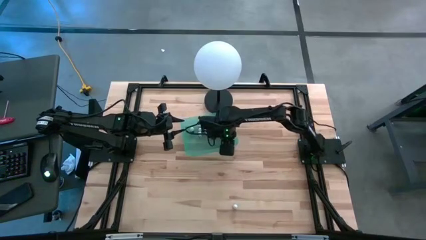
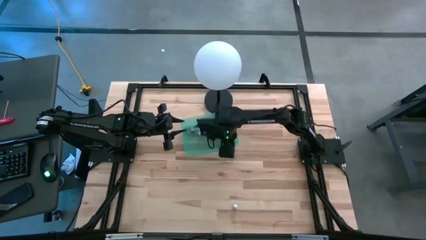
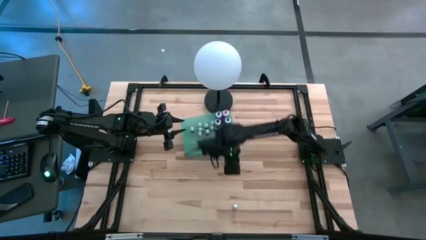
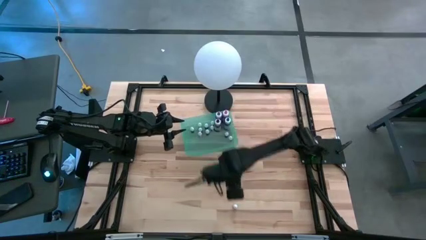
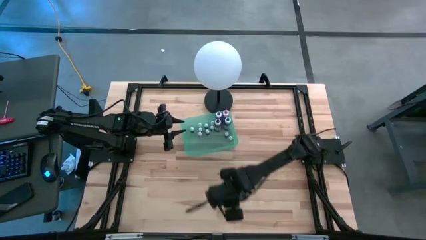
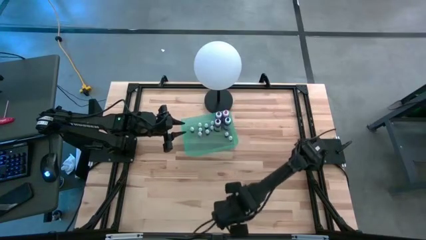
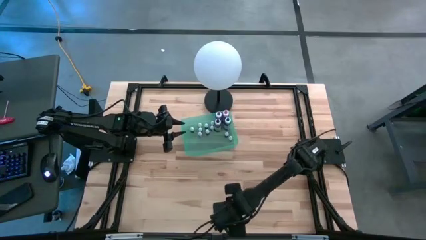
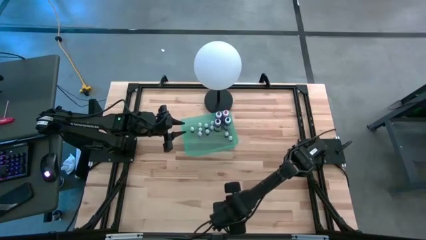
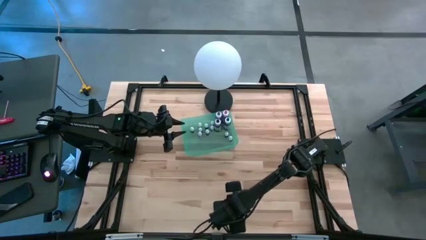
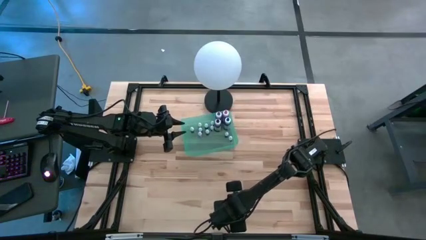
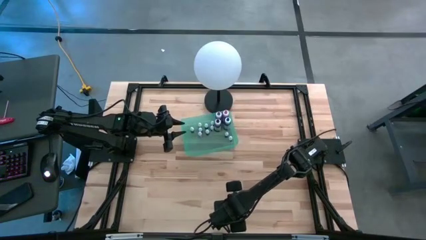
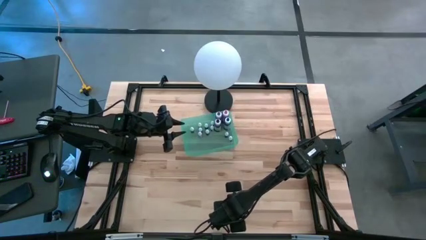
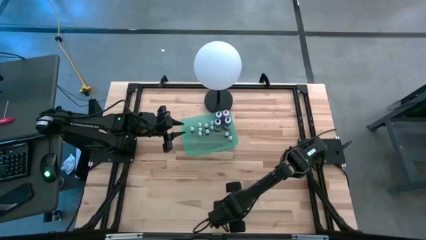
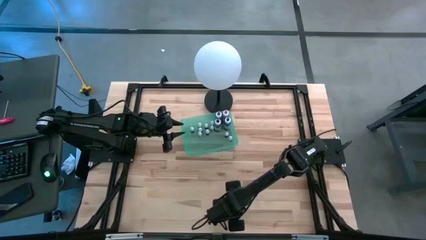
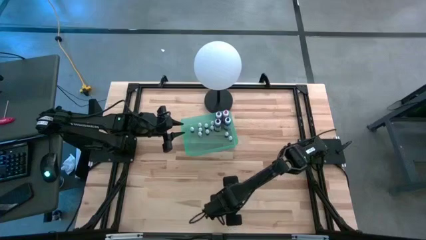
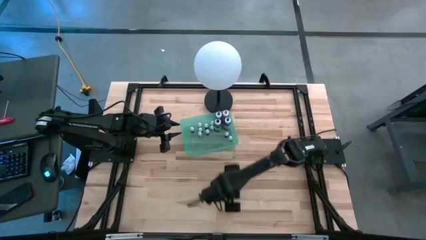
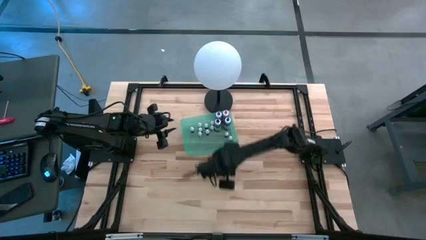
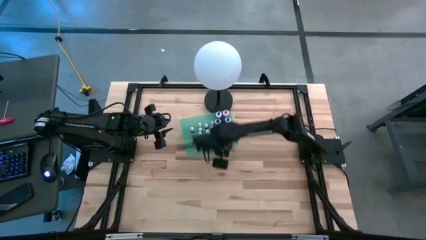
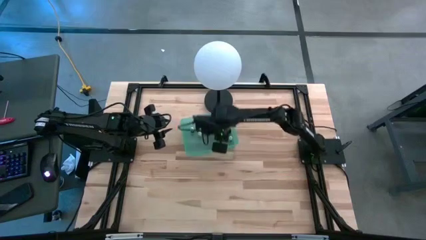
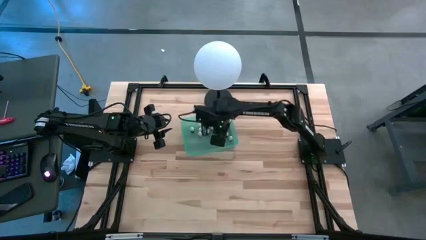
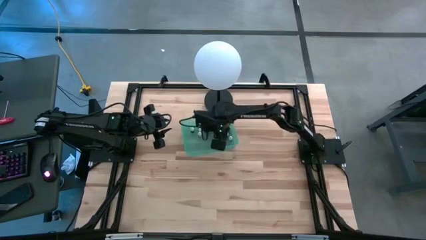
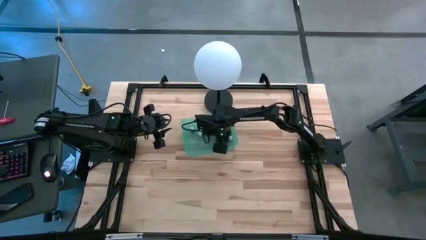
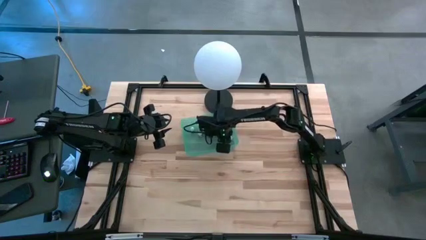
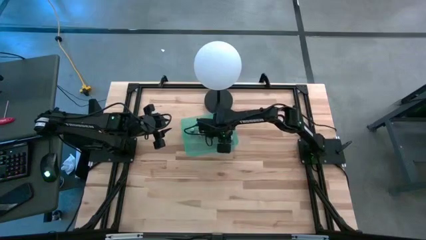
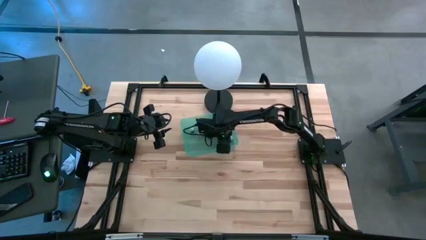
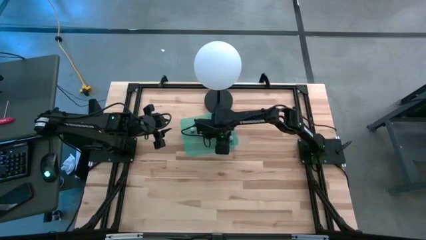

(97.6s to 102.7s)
Task: Pick & Place food coloring
Put the small purple food coloring bottle into the green bin

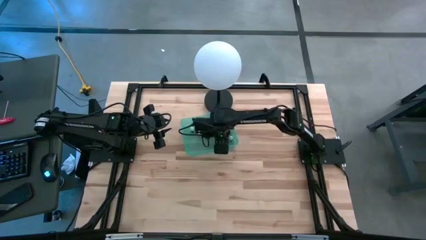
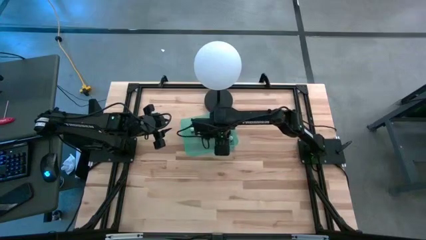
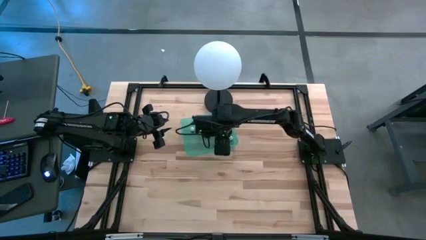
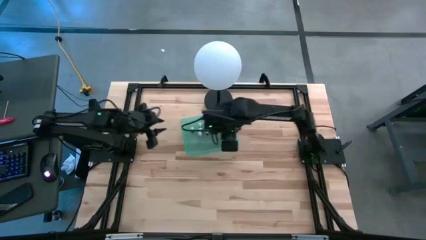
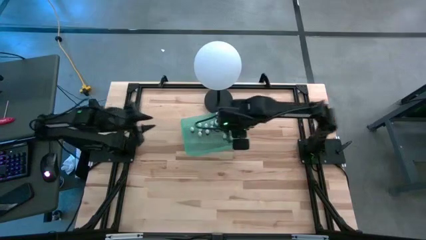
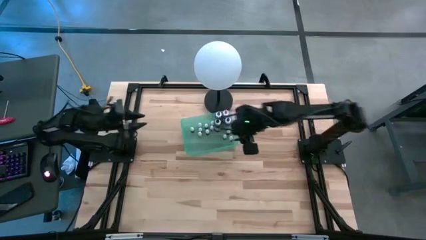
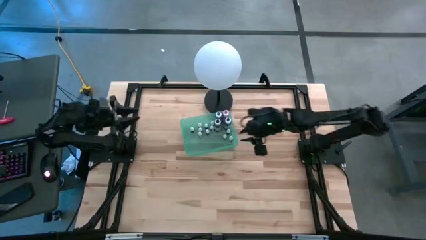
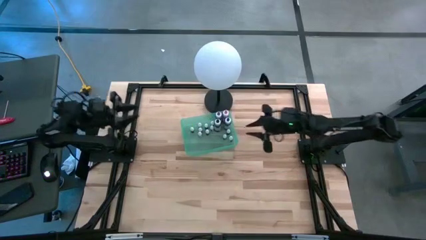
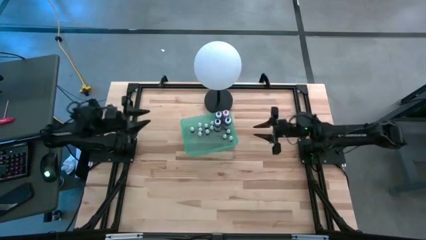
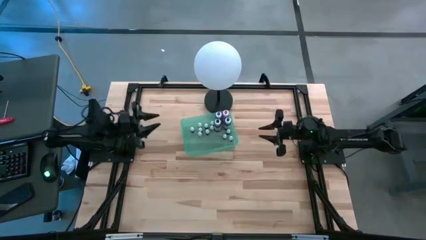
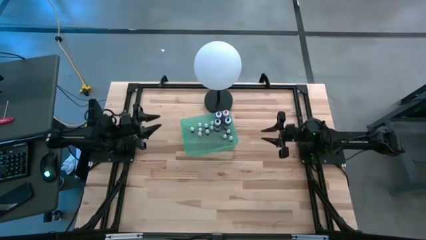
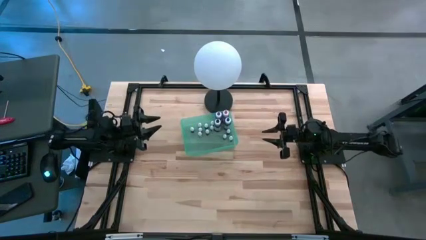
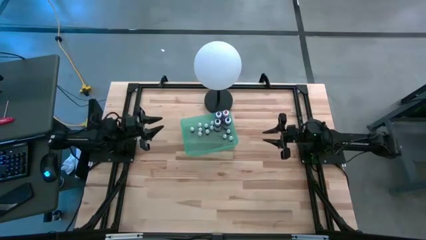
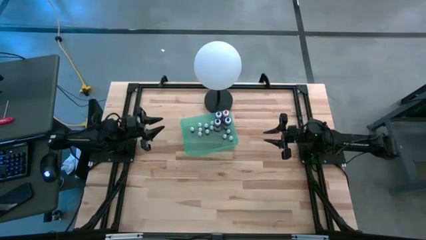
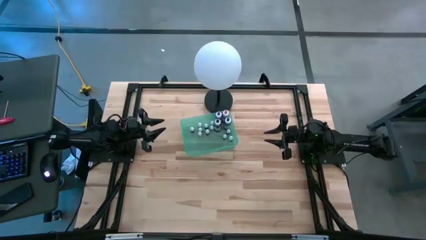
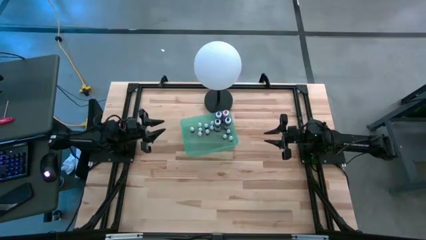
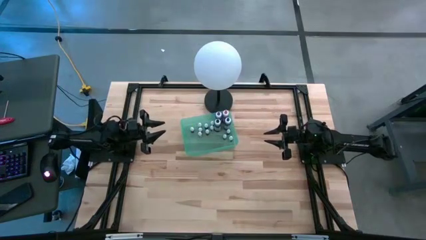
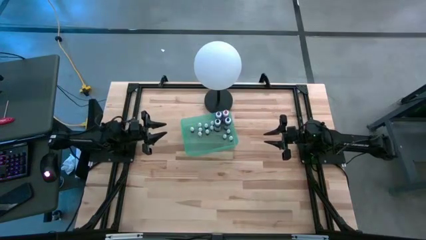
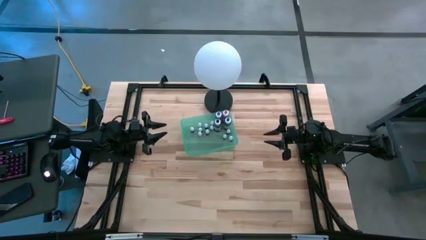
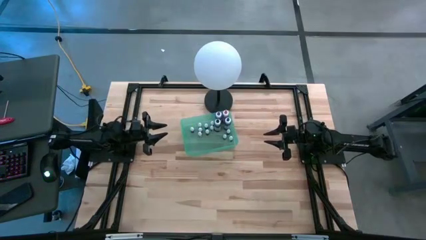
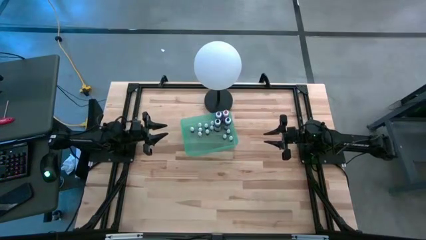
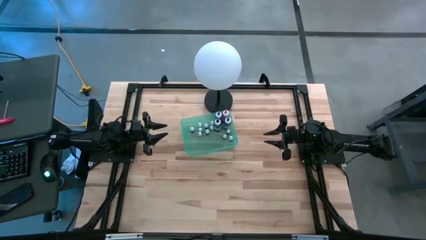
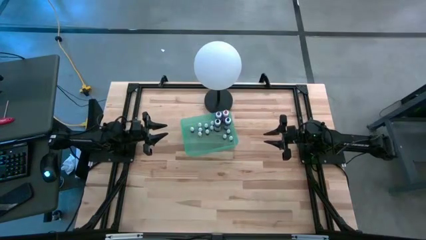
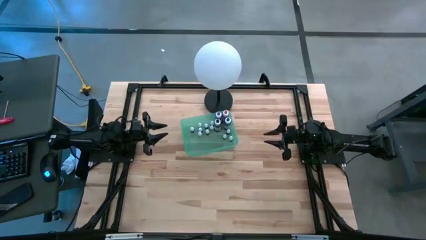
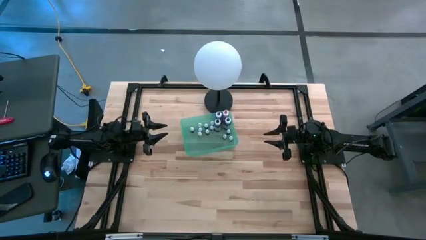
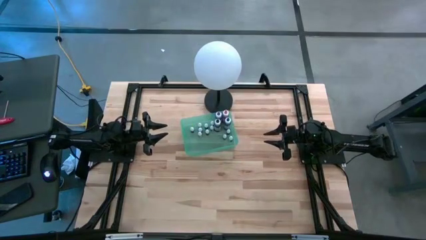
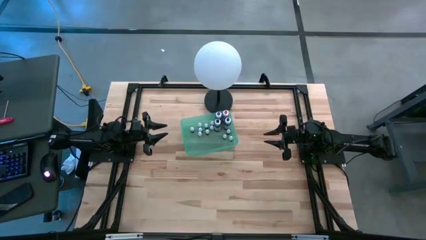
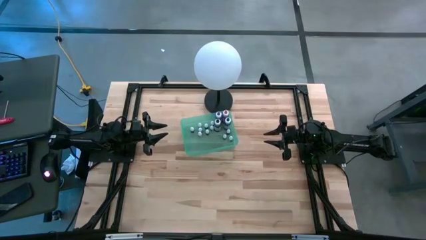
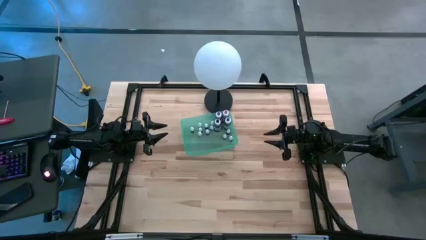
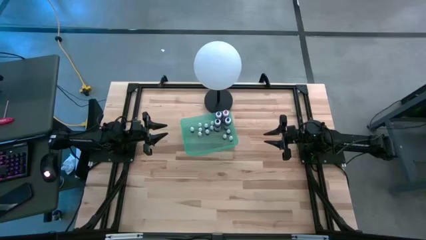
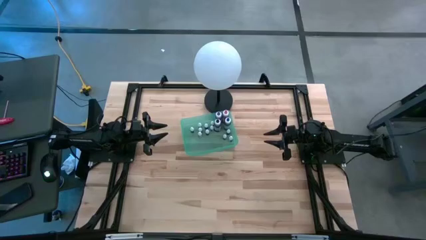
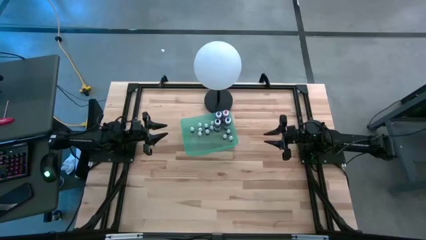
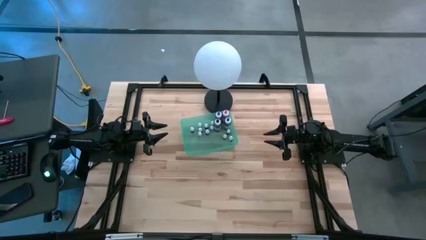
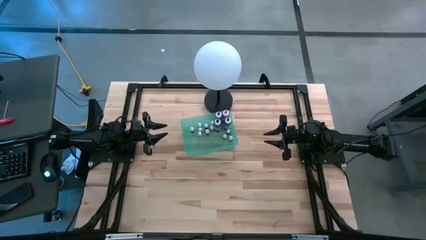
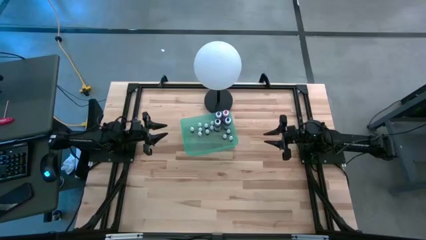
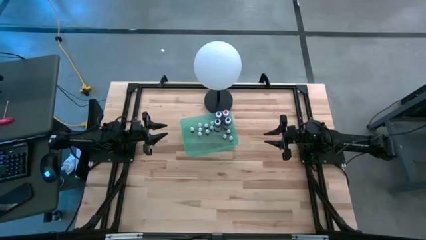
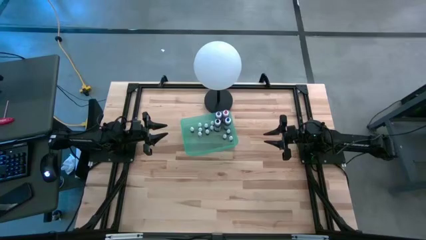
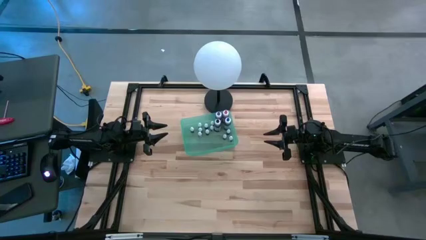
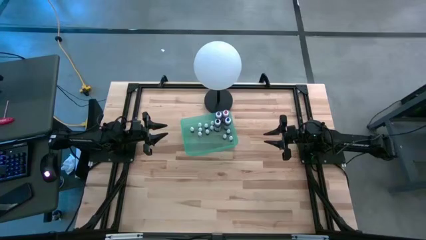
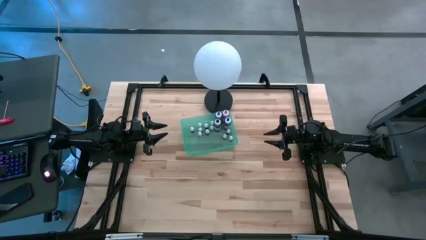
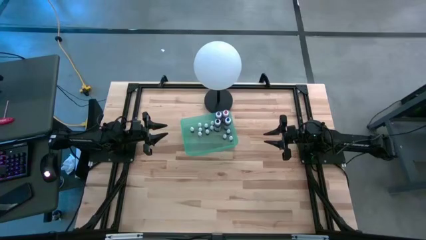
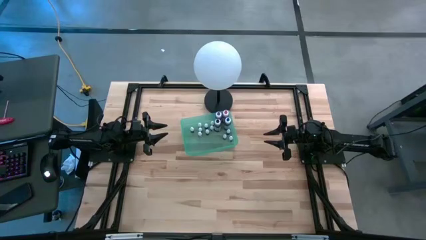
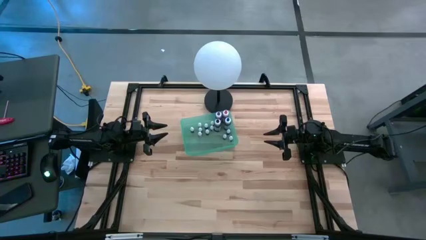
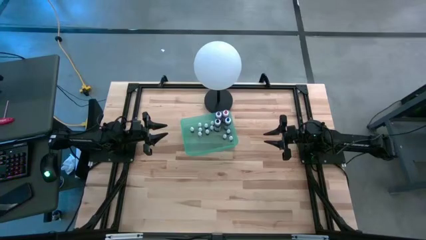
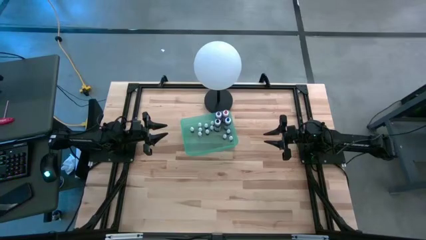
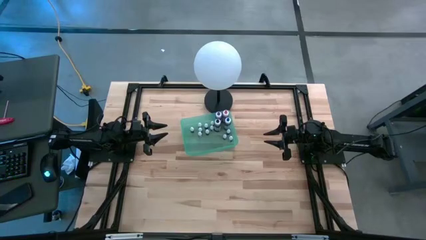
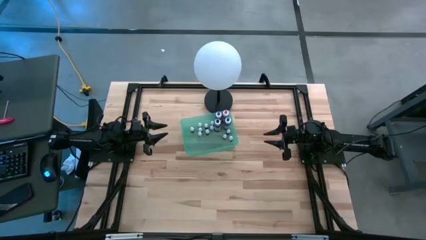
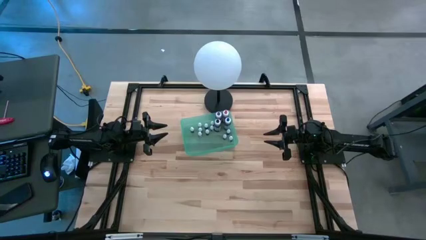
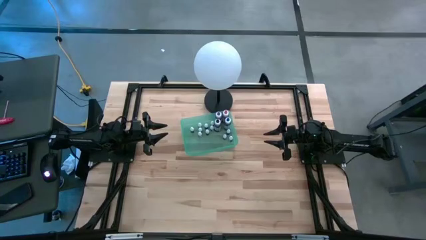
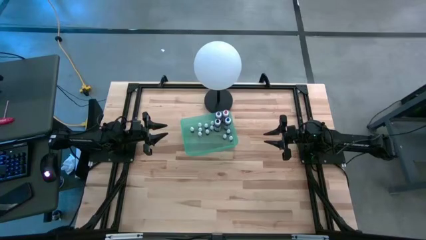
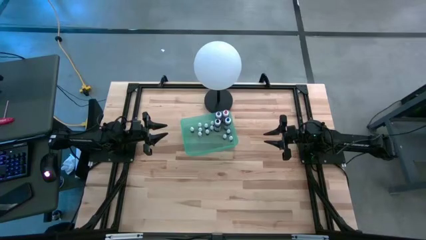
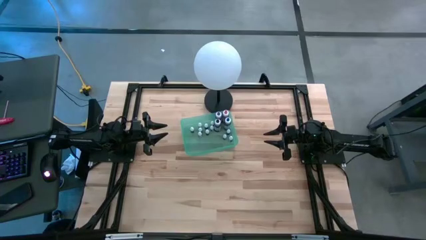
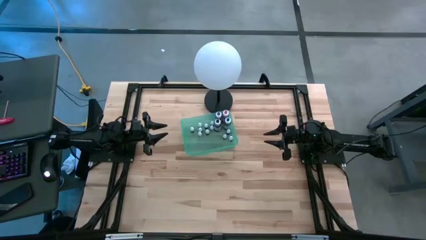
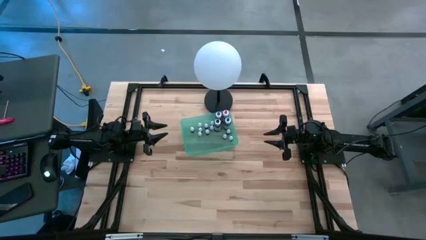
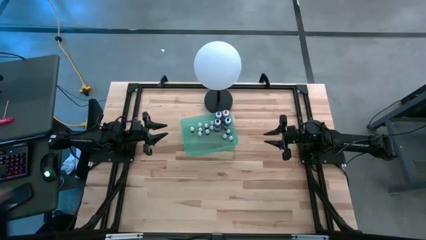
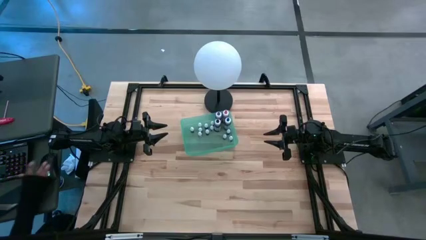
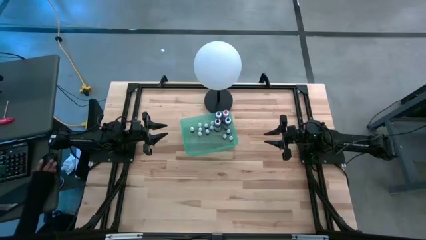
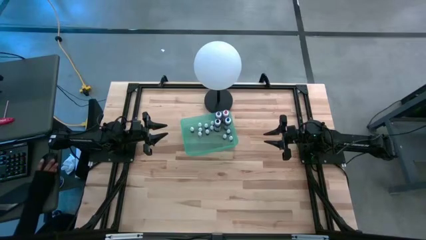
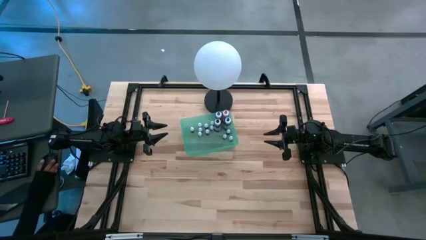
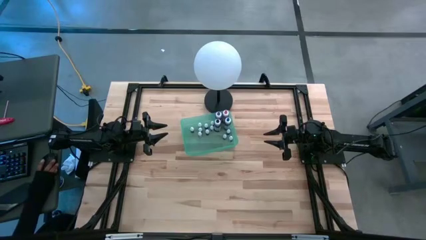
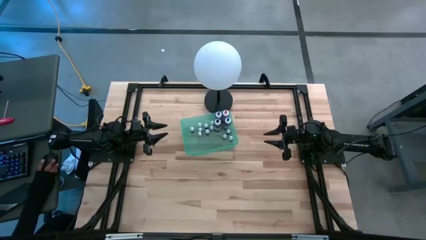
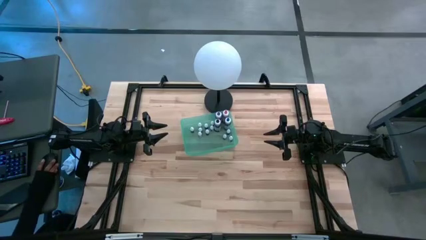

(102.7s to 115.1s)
Return to Home Position
